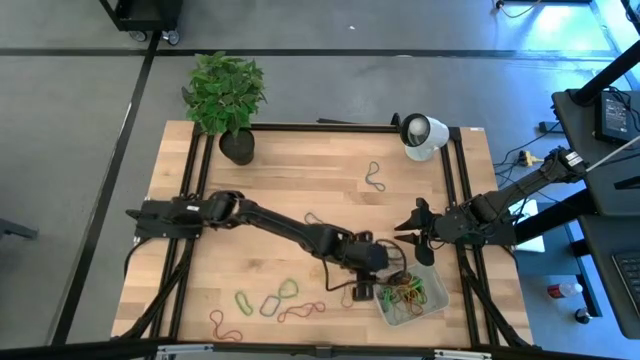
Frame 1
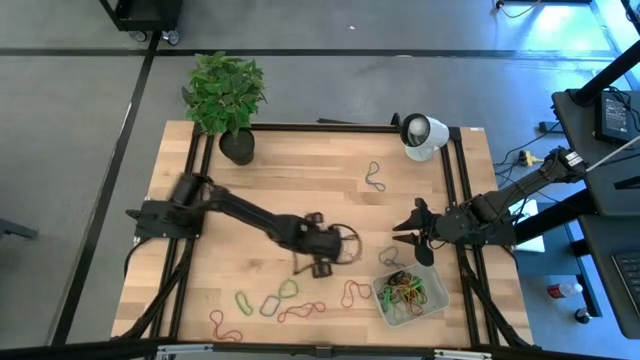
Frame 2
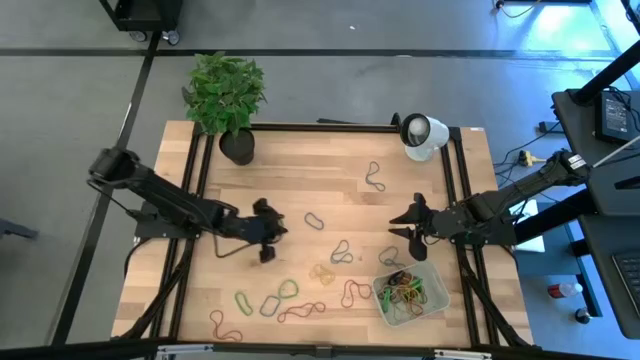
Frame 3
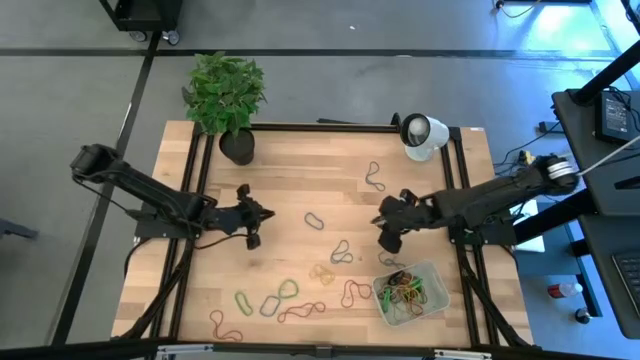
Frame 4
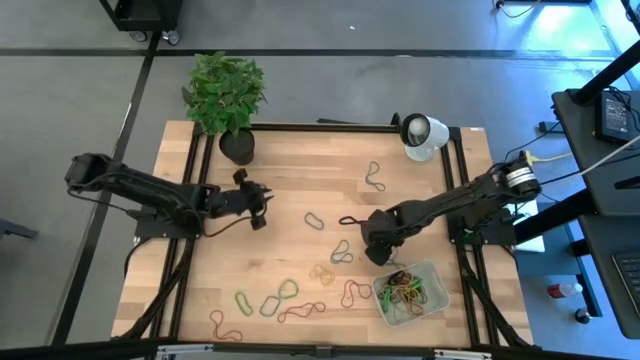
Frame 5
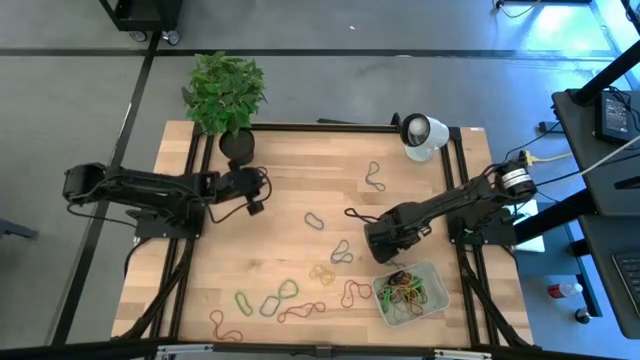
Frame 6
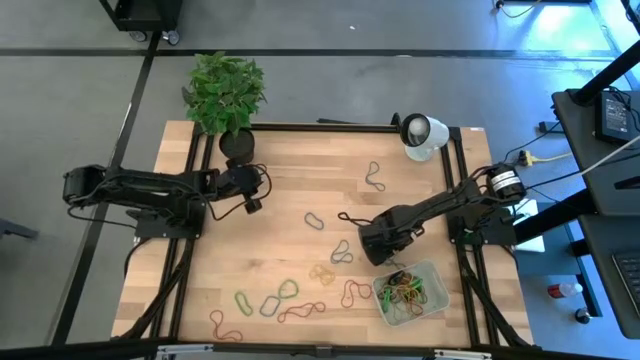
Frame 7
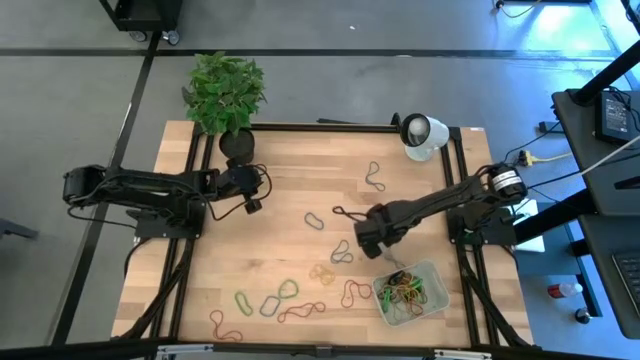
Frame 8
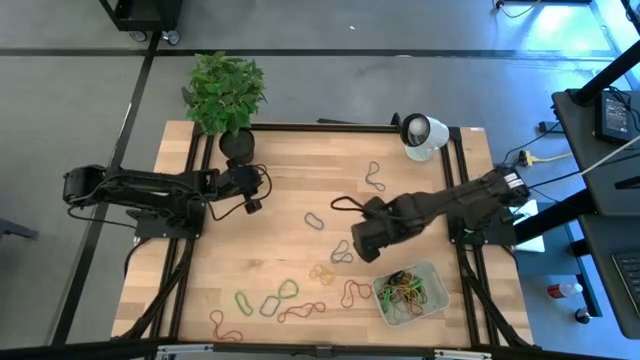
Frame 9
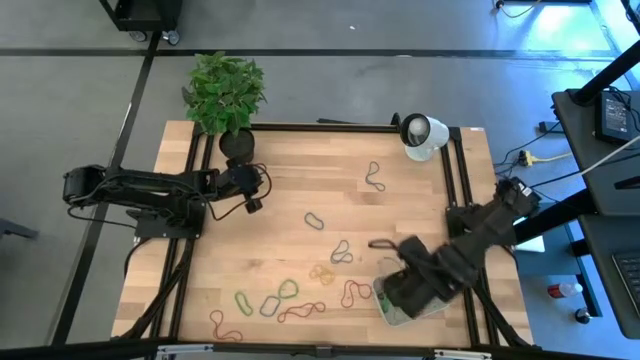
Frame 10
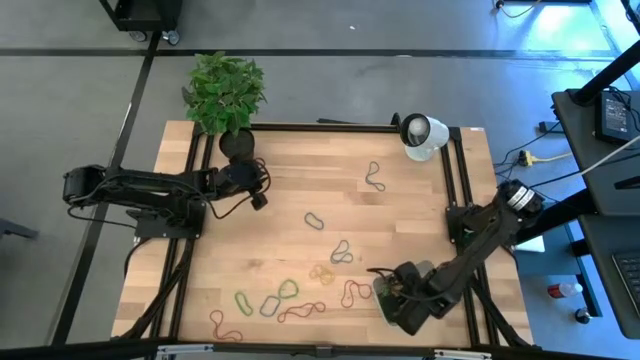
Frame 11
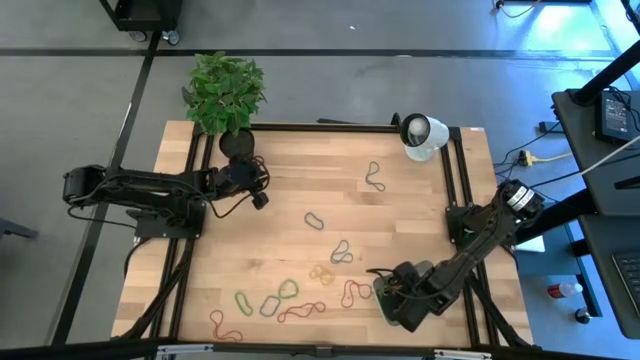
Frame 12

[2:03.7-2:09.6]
Task: Pick and place rubber bands into bin
Put the blue rubber band into the white bin

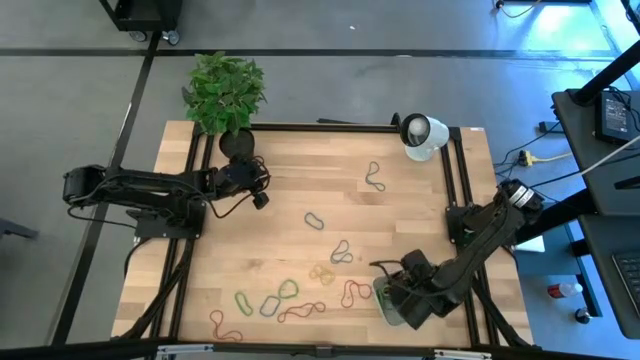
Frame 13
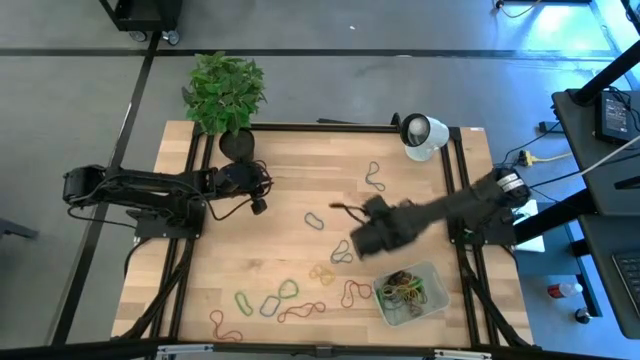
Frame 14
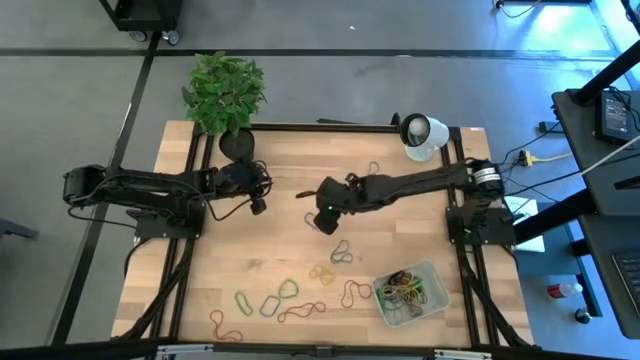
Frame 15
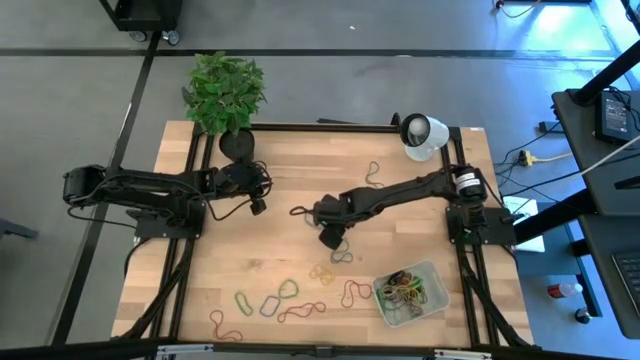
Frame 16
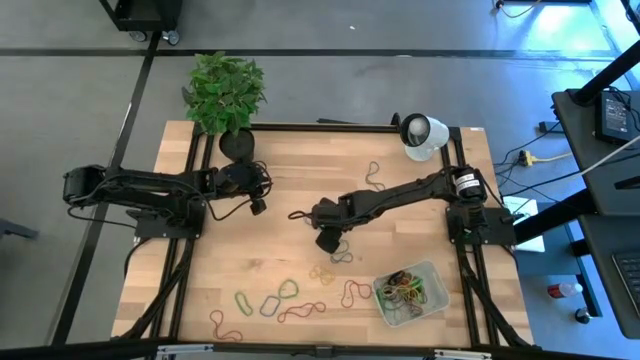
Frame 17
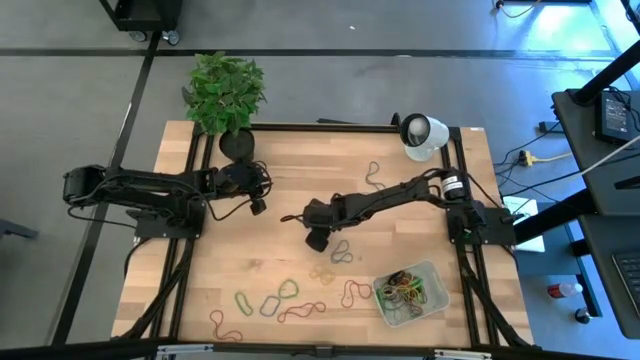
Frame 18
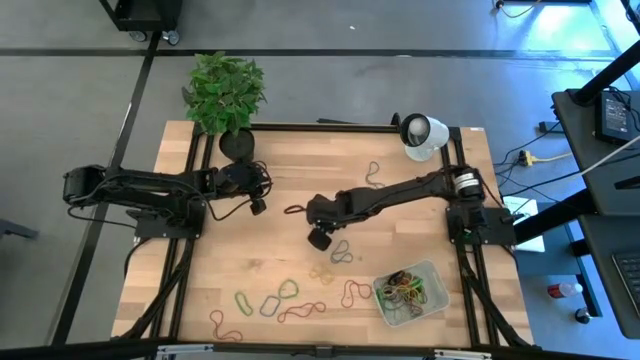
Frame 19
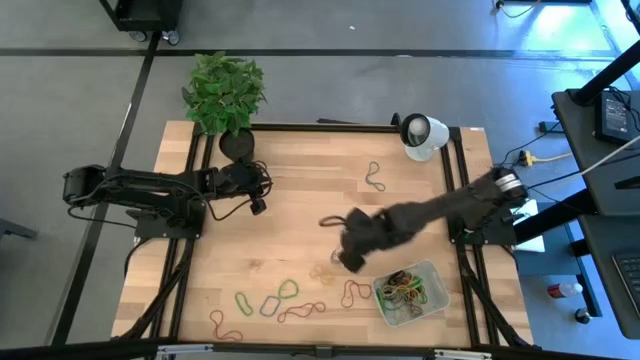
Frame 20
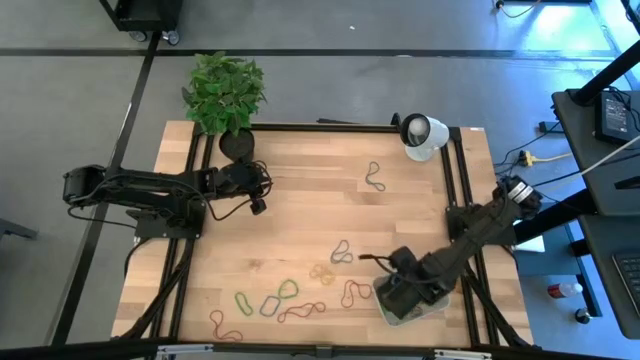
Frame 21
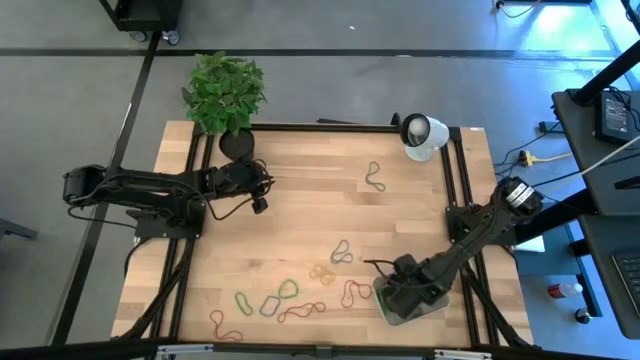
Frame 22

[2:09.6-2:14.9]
Put the blue rubber band into the white bin

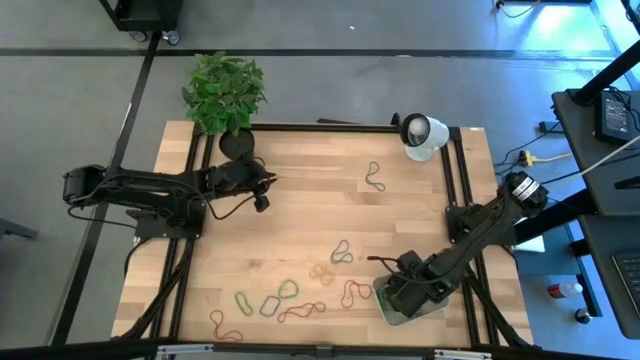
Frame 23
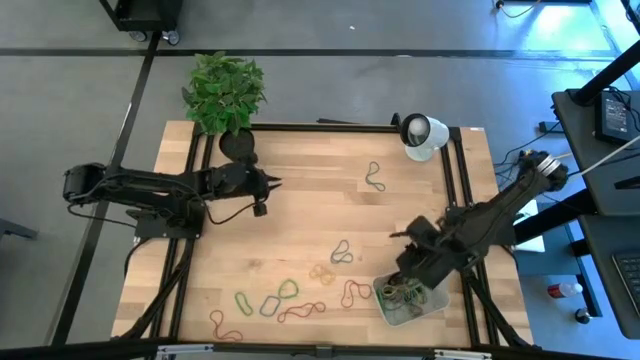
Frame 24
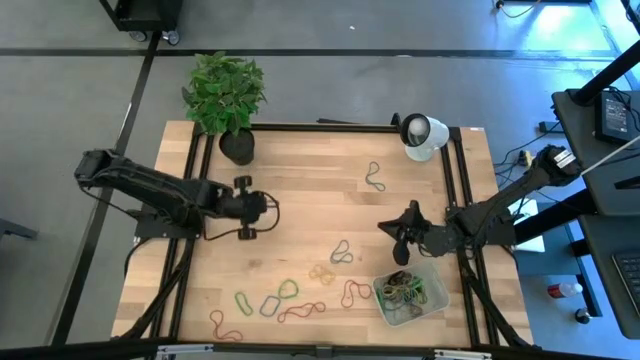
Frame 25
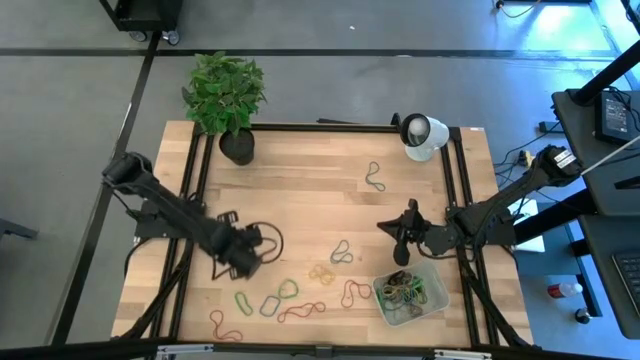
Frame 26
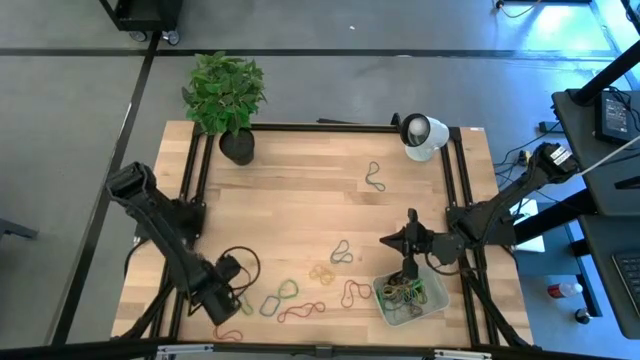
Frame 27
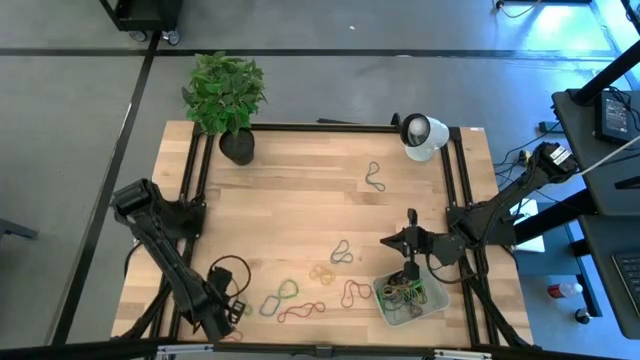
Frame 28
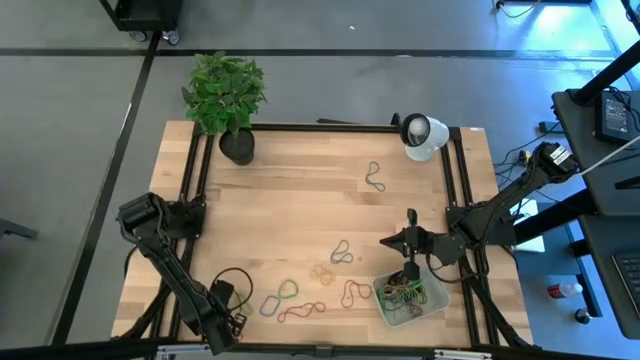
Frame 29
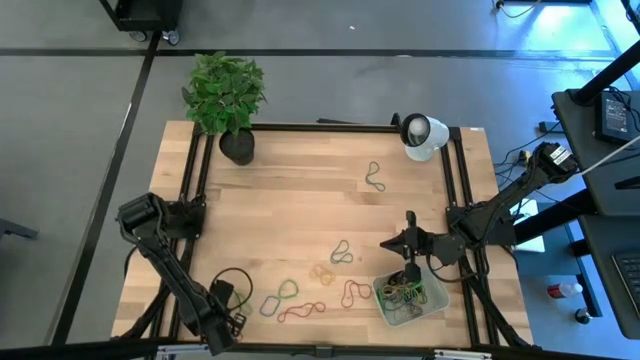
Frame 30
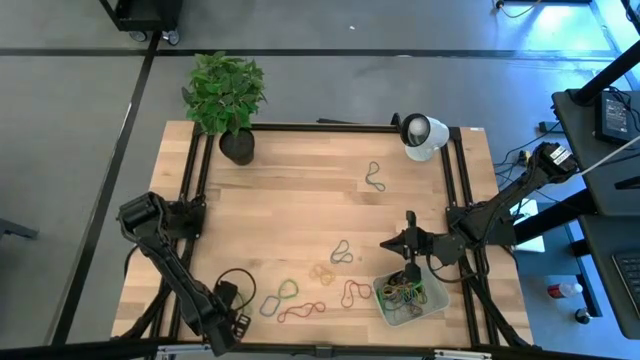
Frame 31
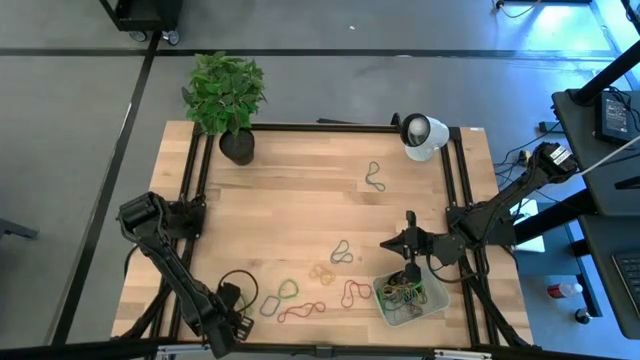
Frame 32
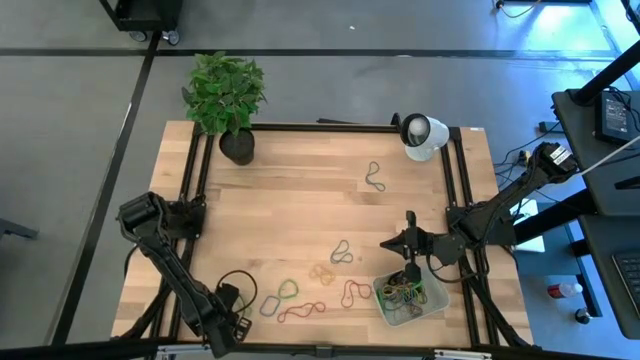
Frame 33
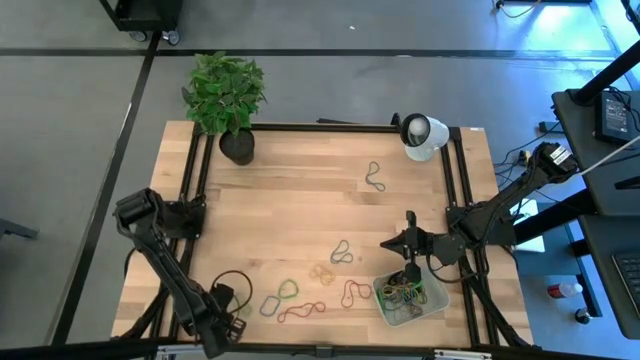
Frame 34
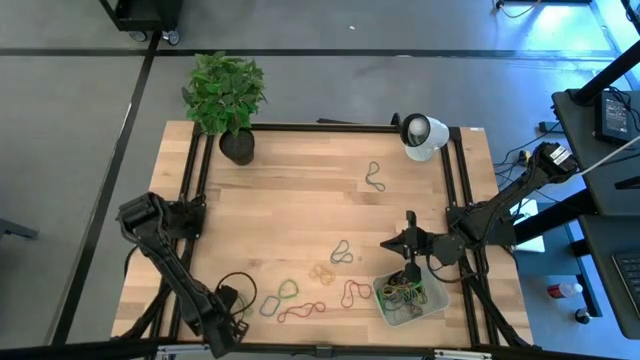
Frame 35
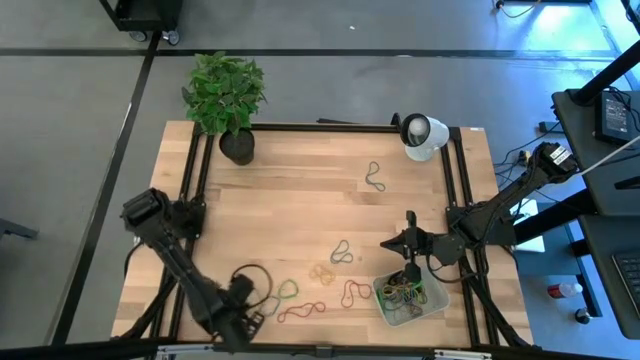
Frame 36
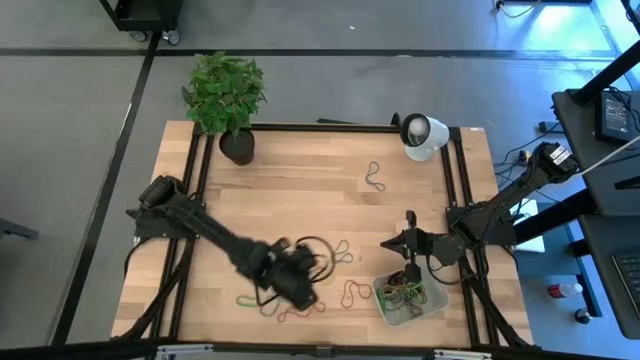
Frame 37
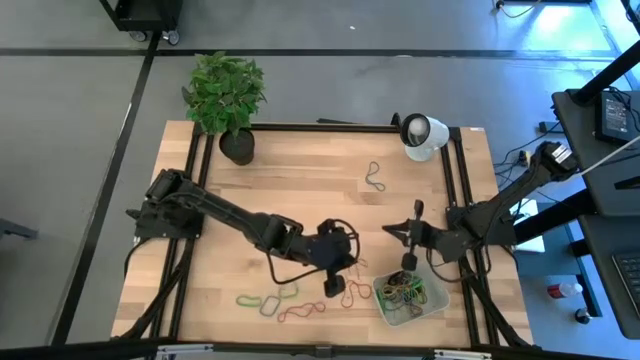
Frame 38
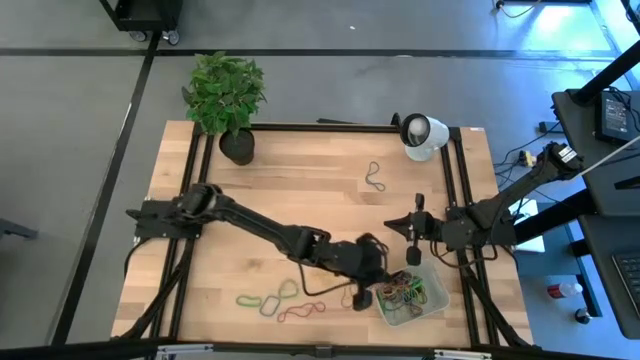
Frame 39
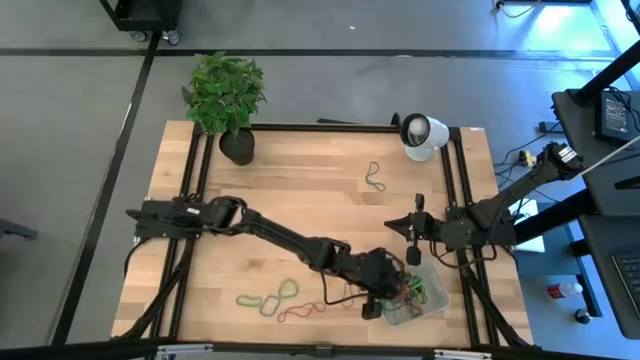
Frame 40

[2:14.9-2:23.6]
Put the red rubber band into the white bin

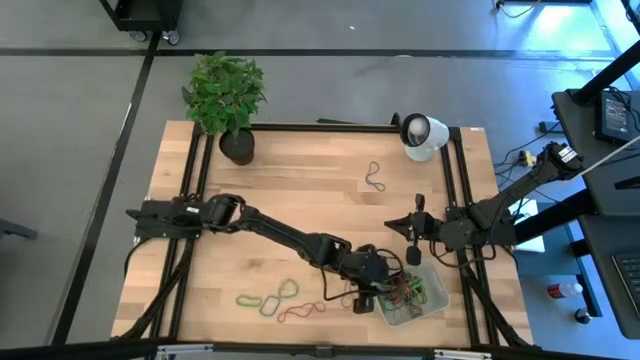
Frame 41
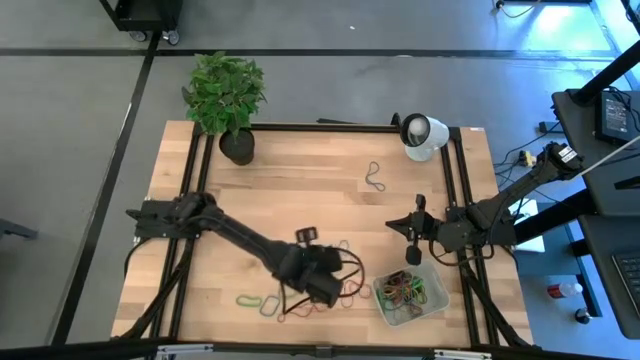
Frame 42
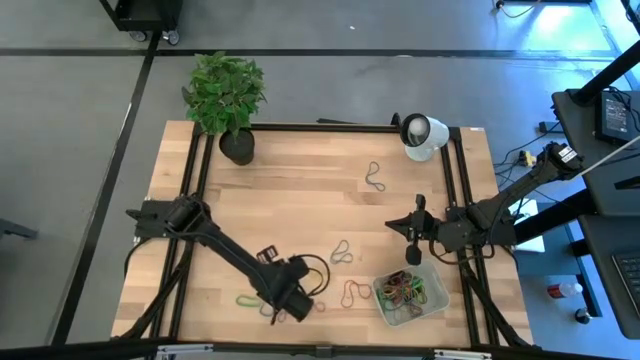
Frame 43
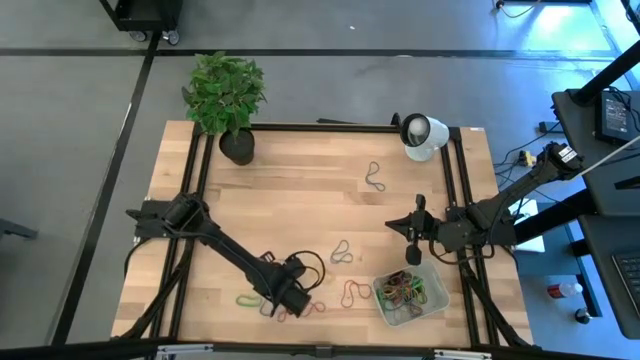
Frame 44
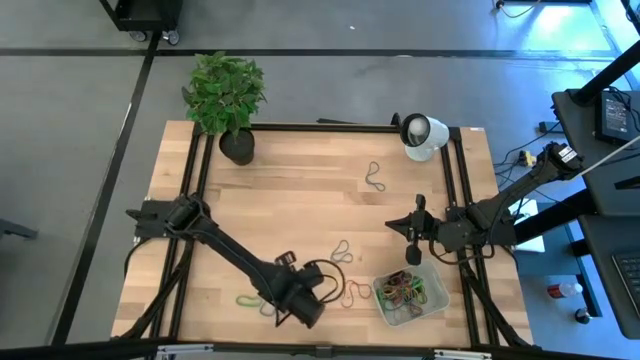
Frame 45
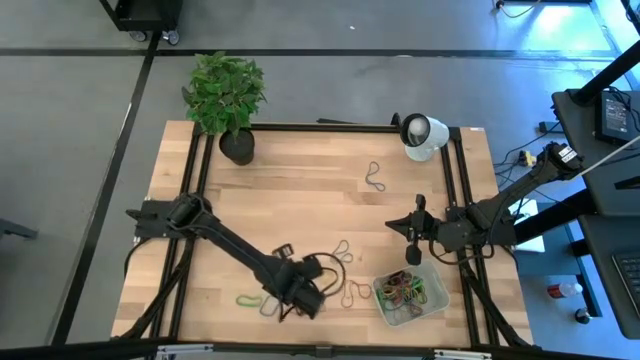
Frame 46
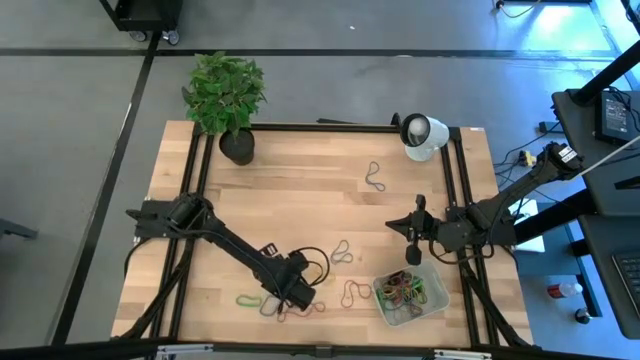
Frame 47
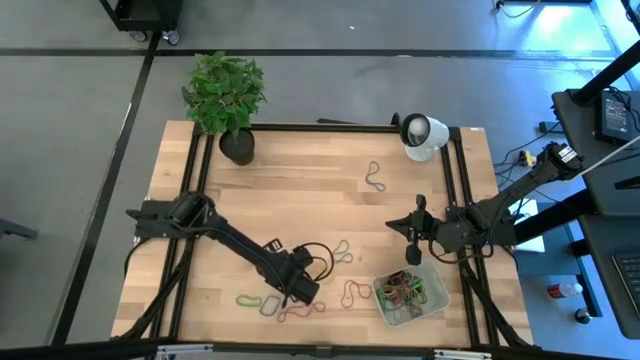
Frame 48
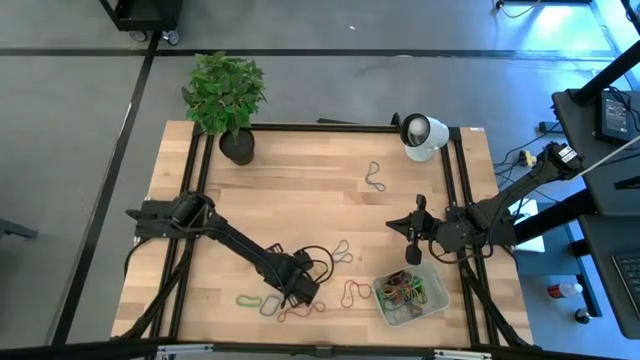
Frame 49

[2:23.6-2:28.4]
Put the green rubber band into the white bin
